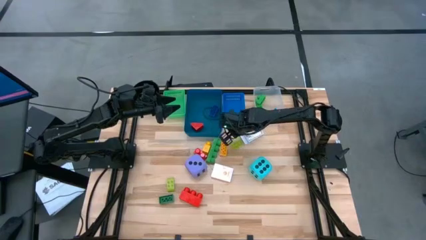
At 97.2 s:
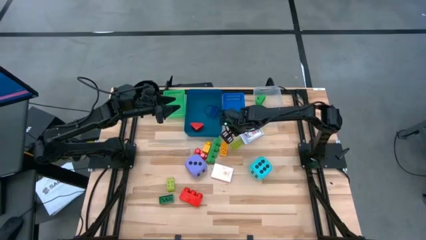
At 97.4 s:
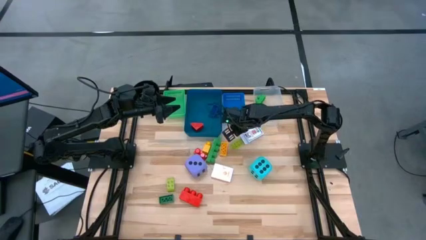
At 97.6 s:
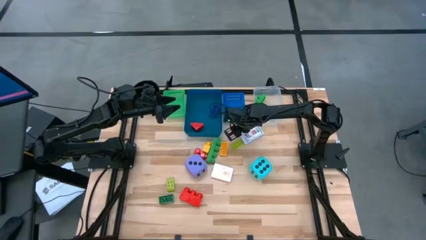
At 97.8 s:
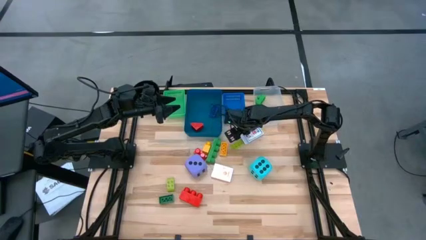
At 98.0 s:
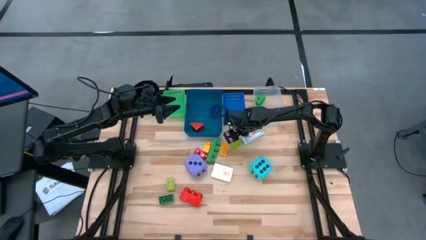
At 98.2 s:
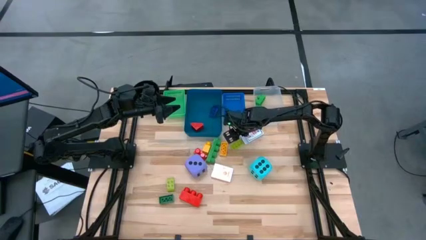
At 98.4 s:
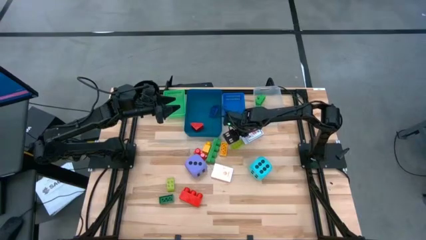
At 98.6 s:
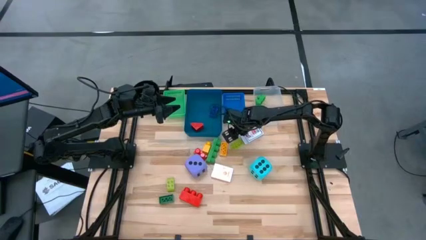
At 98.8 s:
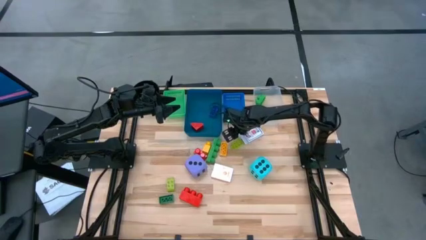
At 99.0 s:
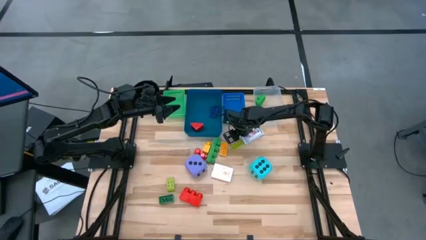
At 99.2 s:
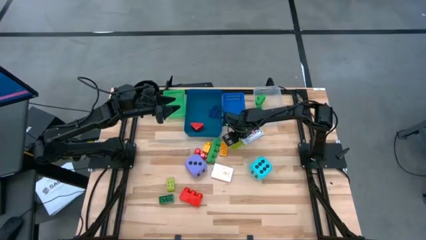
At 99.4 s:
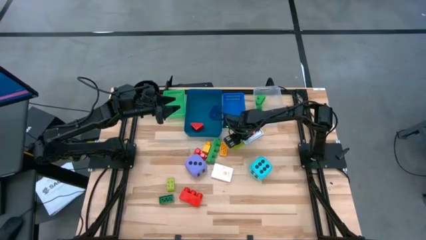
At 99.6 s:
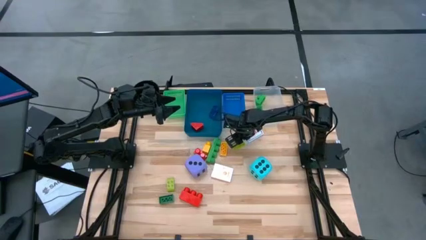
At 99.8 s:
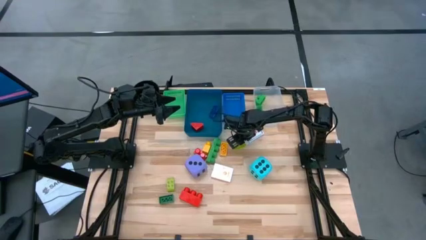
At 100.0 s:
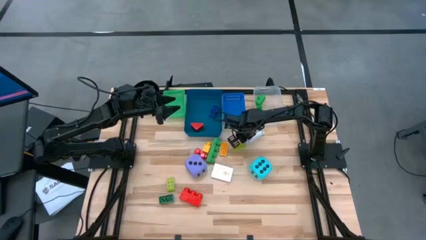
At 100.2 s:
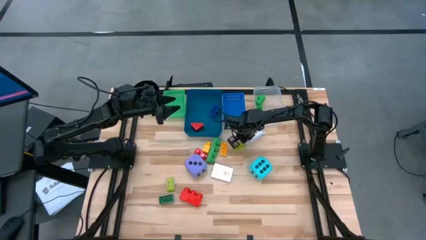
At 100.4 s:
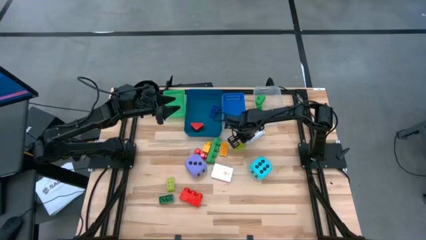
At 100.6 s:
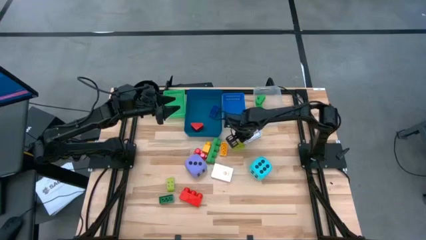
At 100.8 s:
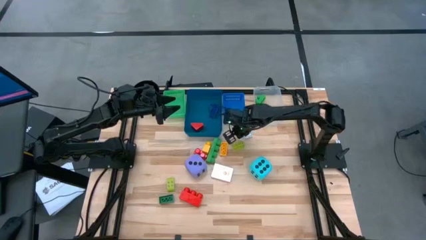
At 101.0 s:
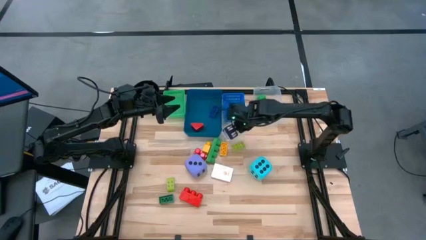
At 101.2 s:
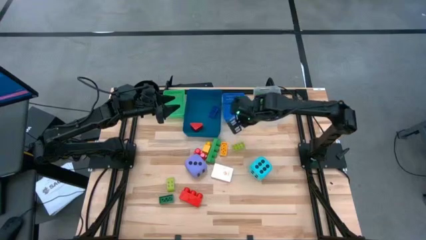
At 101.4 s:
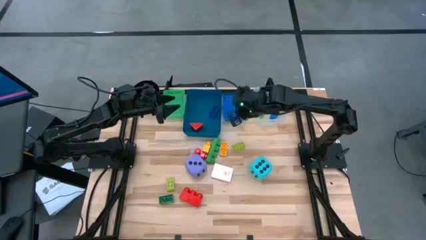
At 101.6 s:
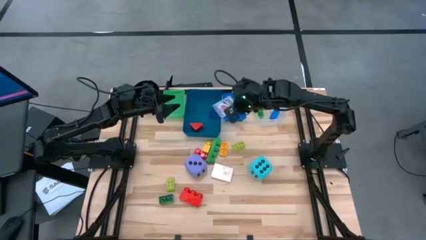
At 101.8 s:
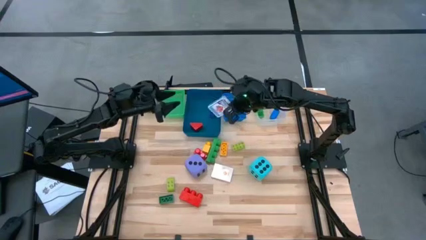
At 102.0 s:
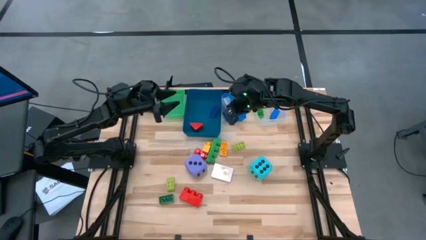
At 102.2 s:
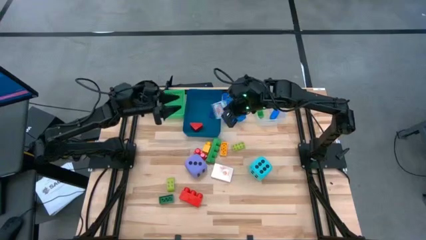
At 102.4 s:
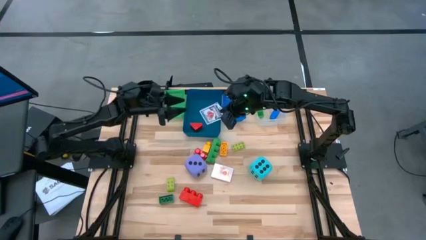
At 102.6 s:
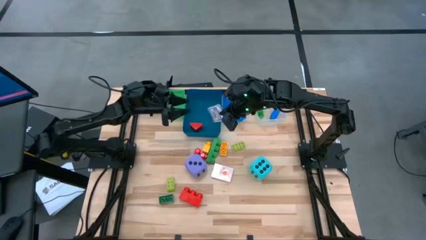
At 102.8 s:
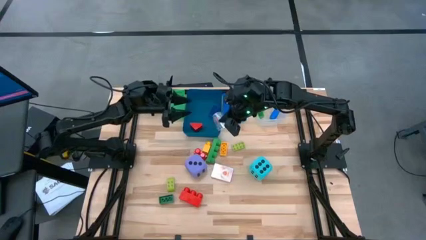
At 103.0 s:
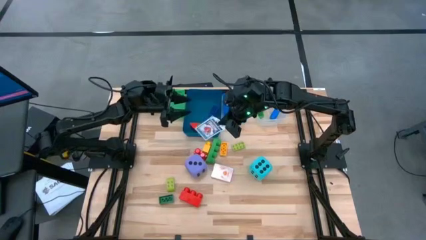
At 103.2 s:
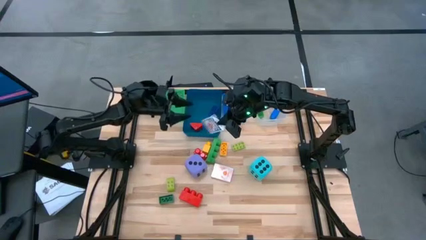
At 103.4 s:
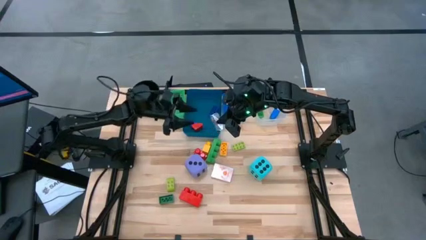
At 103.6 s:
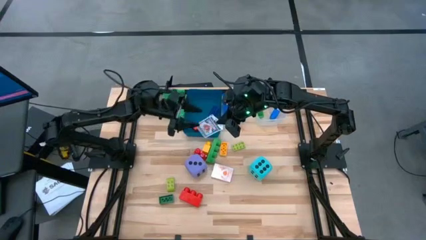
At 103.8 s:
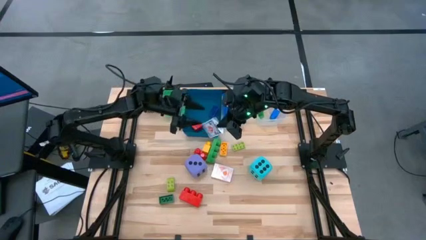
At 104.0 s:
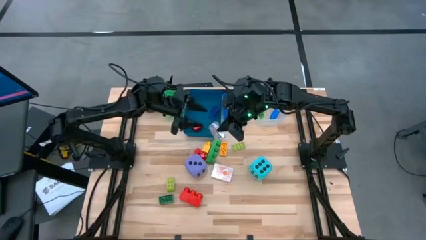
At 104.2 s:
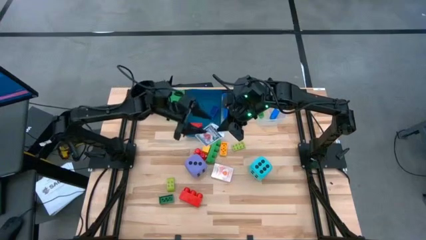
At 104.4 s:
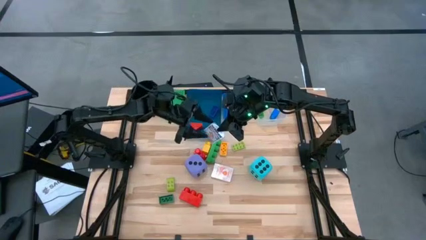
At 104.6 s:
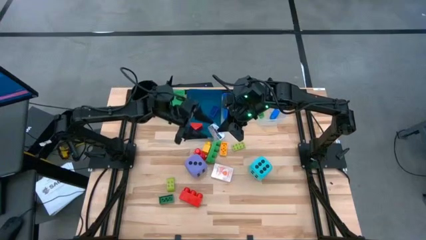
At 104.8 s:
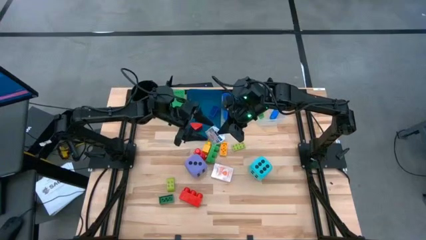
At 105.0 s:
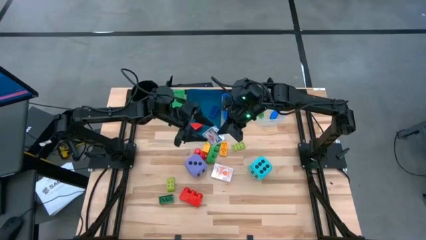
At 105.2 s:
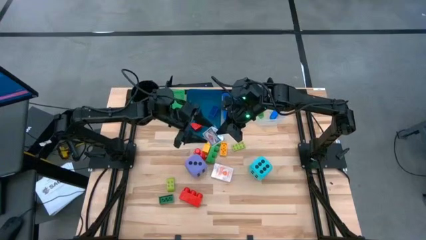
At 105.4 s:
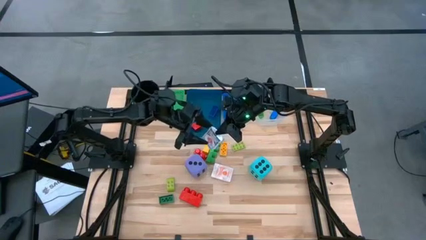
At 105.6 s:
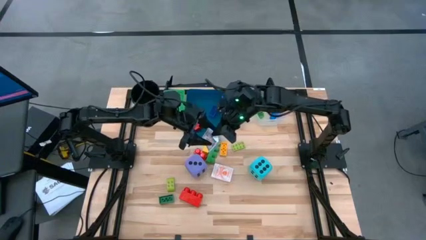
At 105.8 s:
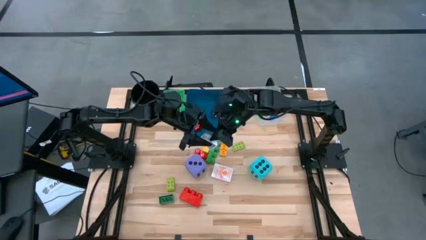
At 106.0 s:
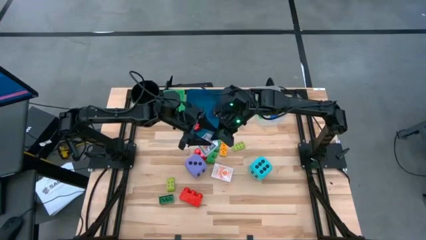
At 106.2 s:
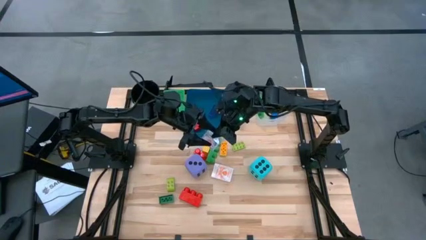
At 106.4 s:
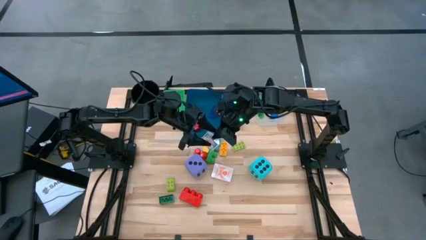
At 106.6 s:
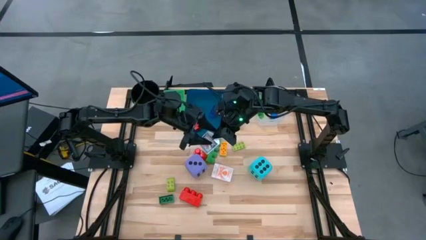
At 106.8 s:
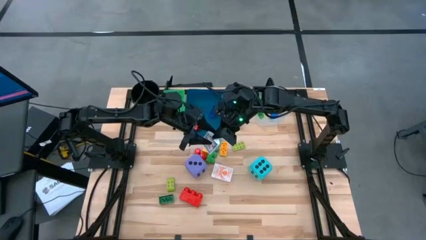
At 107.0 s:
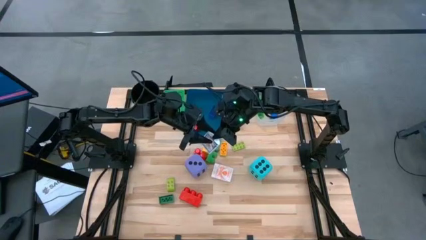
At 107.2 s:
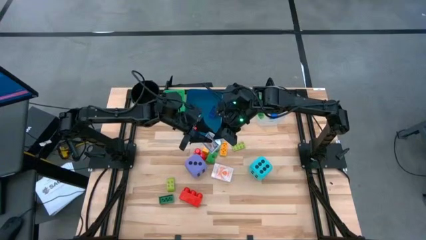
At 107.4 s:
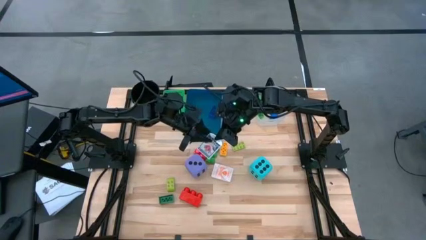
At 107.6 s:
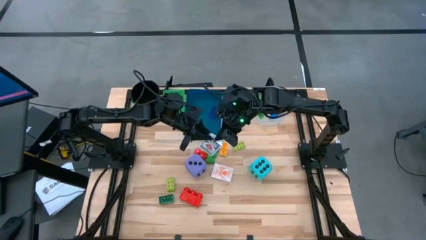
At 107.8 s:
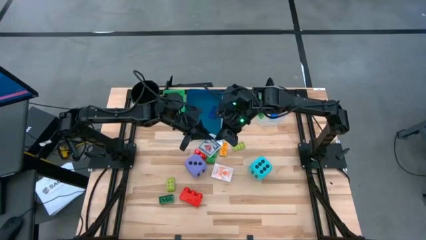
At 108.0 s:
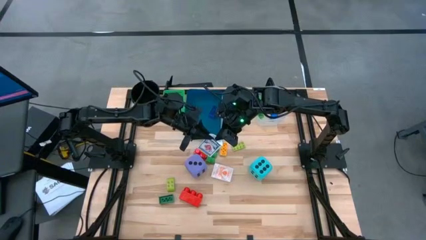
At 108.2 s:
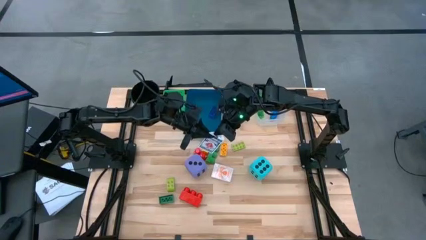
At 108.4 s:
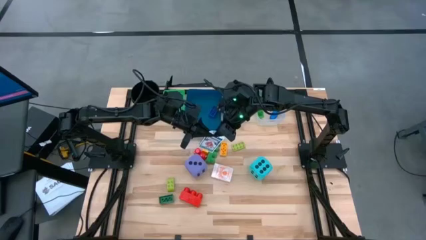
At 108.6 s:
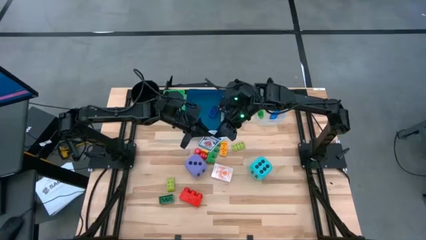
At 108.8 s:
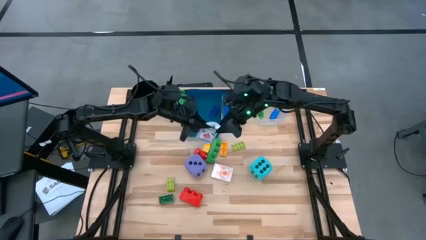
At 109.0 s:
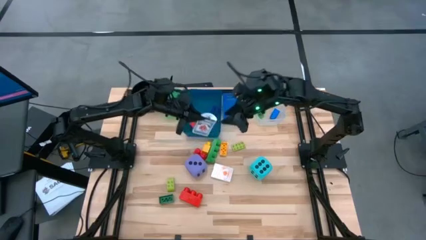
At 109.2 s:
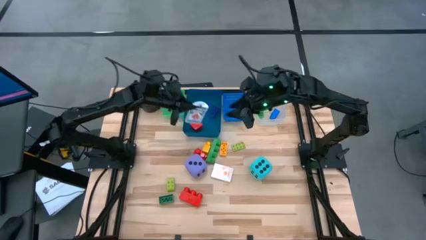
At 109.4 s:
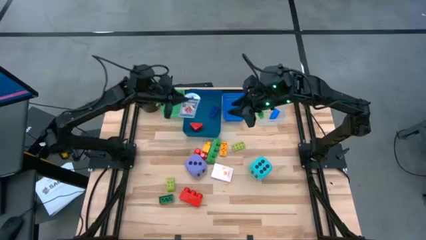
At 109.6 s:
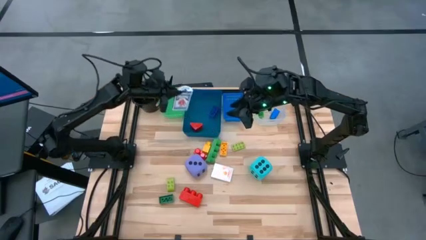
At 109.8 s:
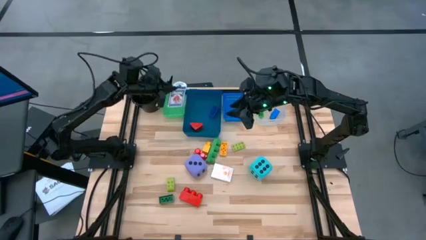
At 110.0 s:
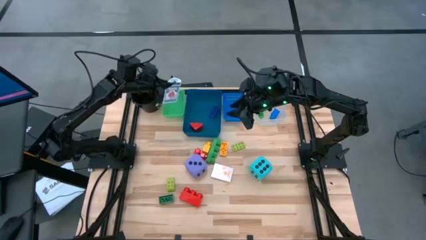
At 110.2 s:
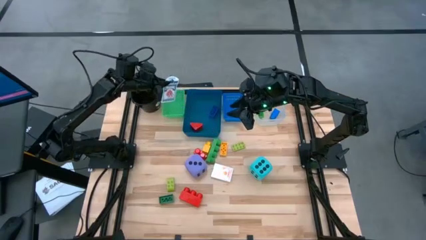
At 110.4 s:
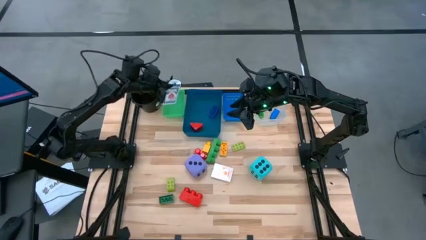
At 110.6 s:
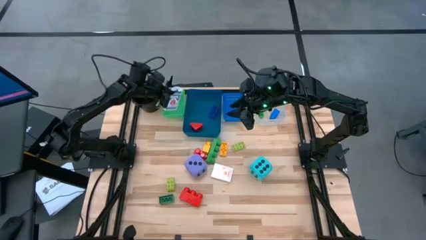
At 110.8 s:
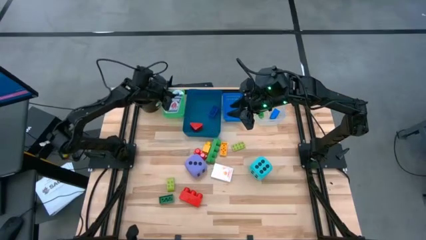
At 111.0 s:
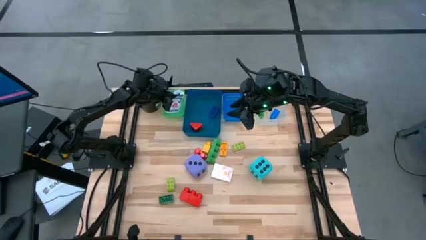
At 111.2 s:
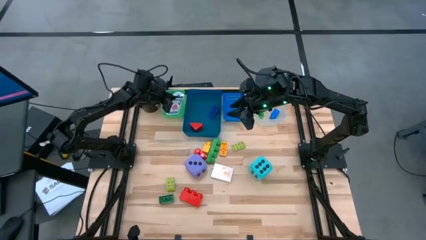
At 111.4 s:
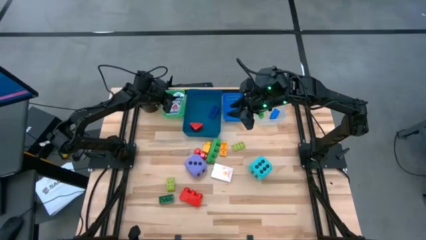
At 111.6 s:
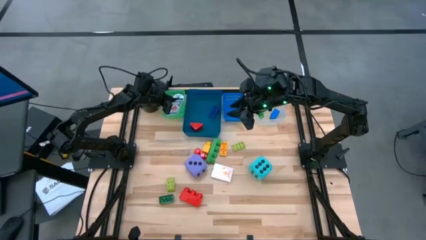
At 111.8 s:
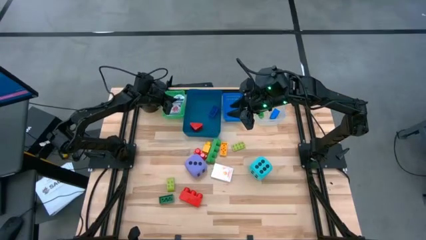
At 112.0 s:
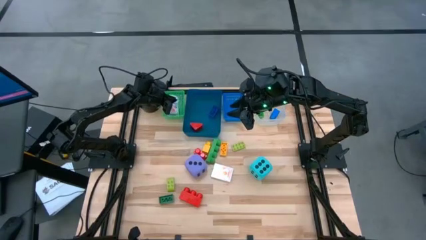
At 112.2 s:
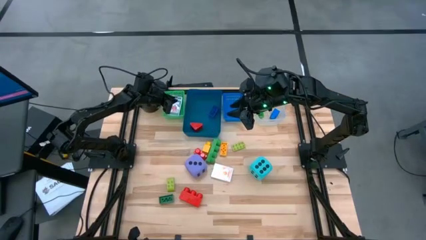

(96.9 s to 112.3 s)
Task: Pick & Place Toys
Put the blue game card into the green bin
